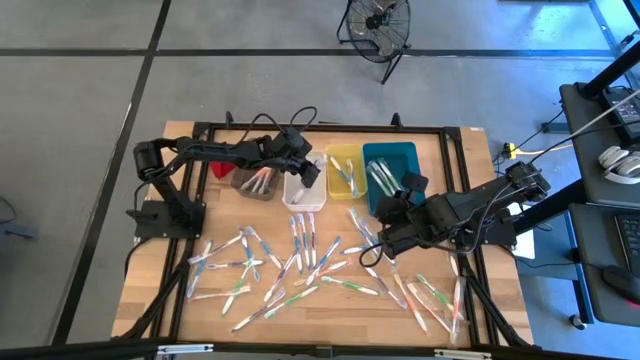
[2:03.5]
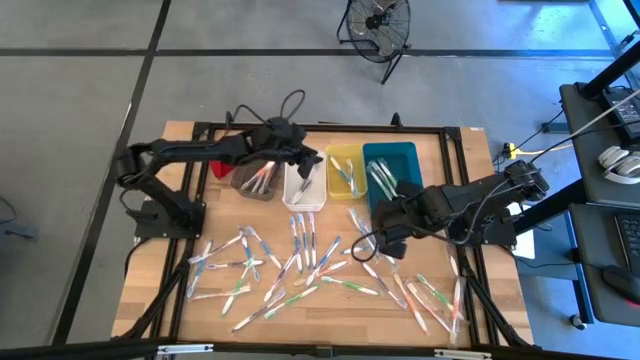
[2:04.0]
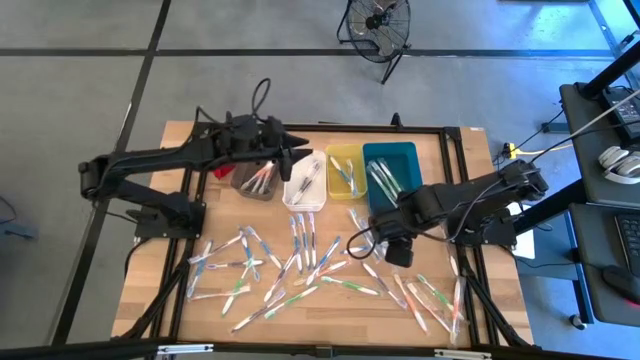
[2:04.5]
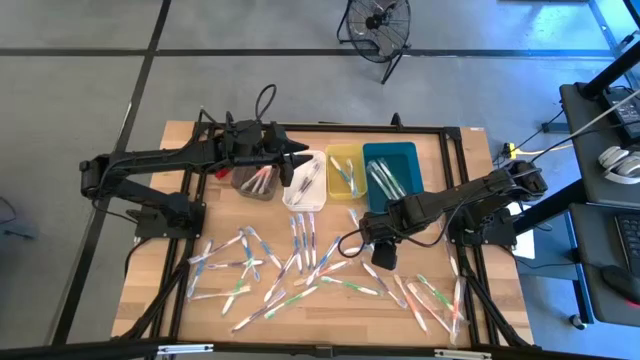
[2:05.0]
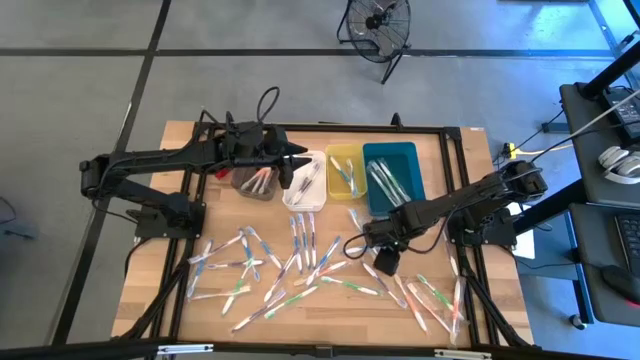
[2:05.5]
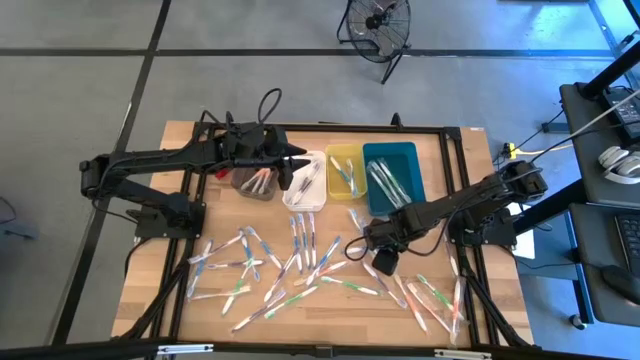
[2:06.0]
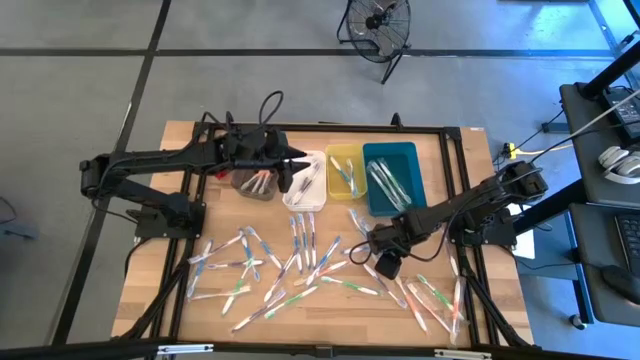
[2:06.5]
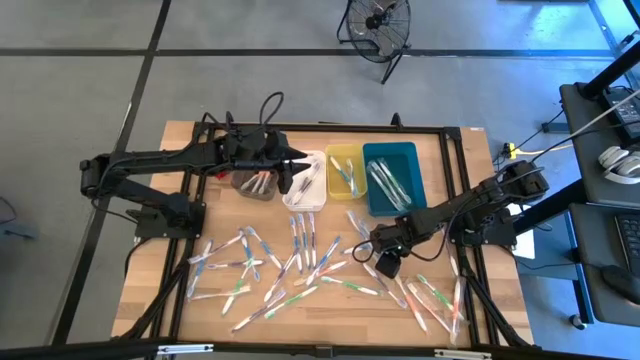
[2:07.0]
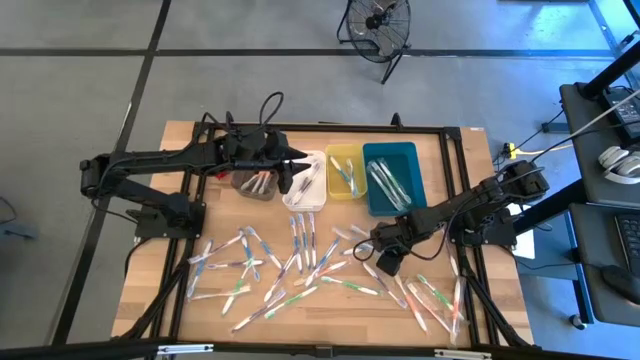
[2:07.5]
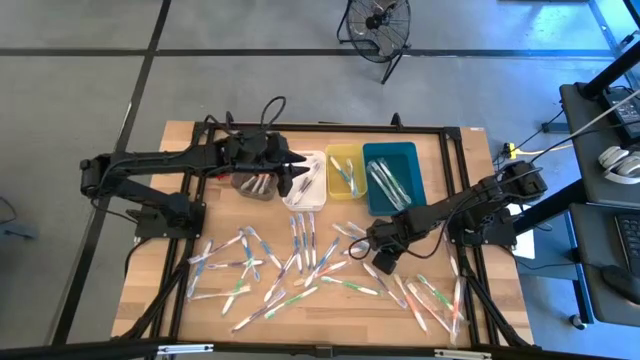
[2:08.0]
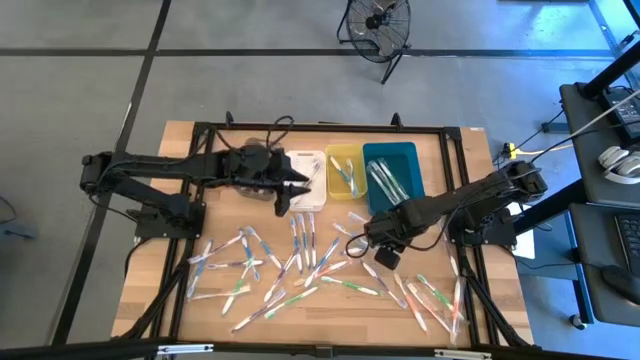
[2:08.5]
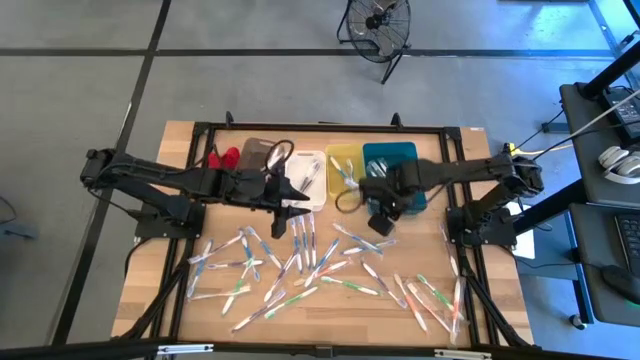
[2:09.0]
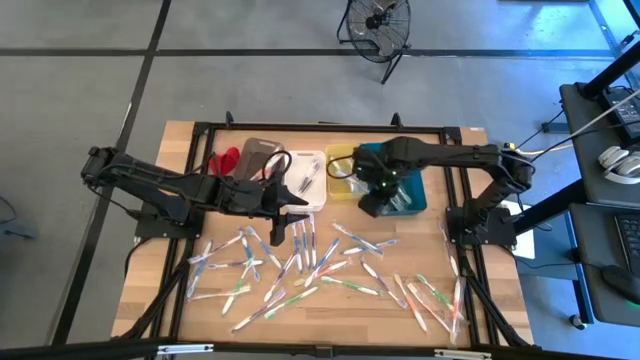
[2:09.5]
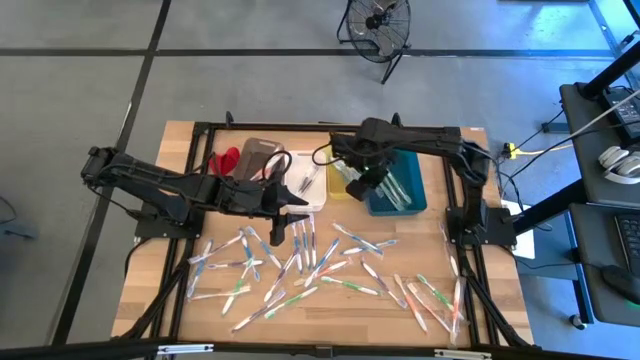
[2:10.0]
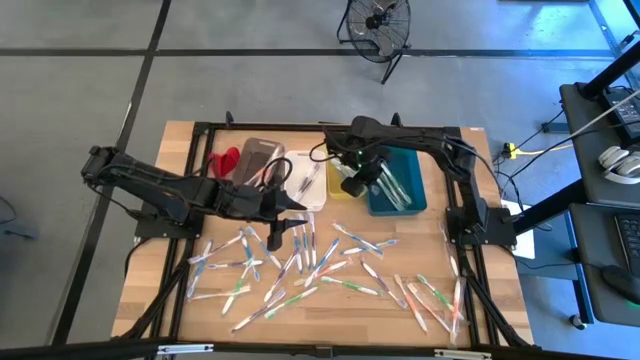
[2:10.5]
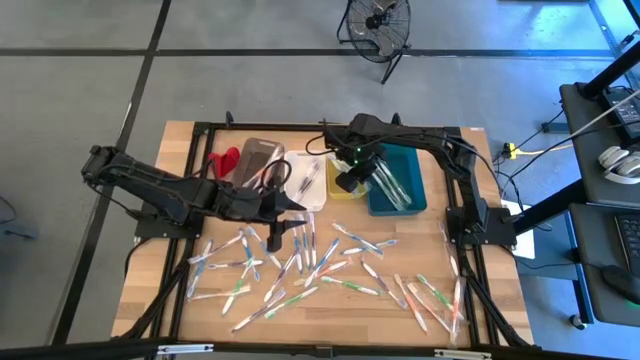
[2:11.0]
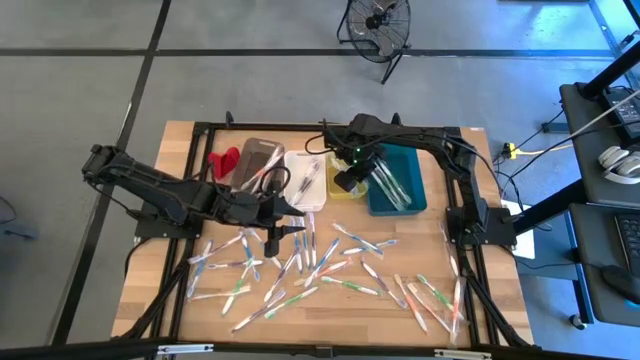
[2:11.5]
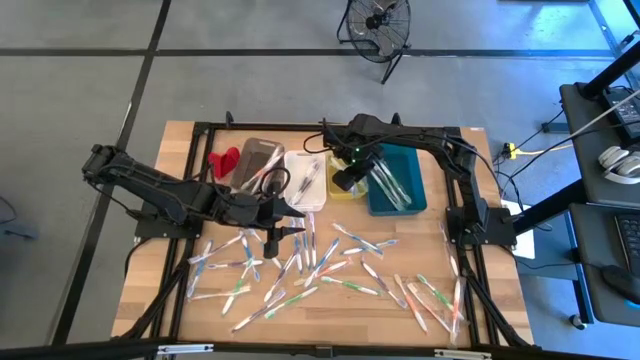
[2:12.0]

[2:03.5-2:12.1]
Task: Pick & Place Toothbrushes
Put the blue toothbrush into the yellow bin

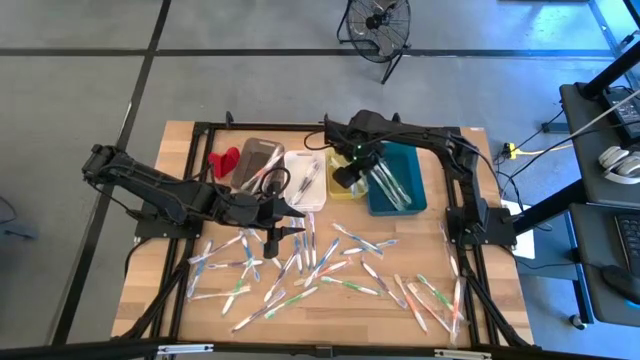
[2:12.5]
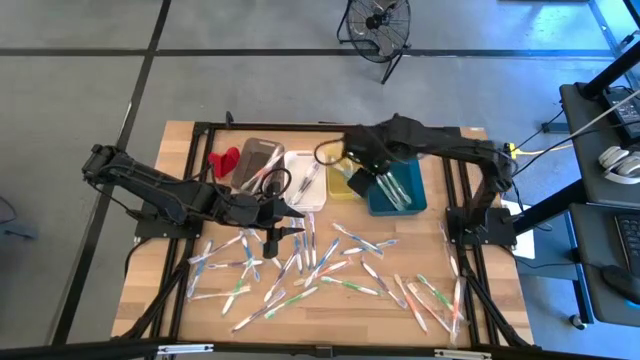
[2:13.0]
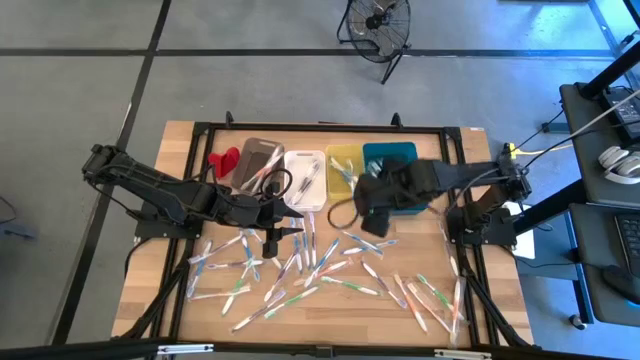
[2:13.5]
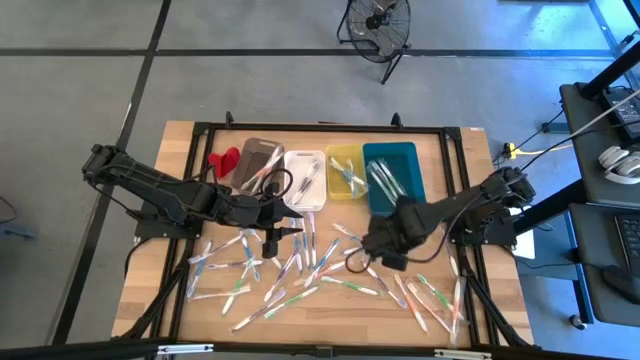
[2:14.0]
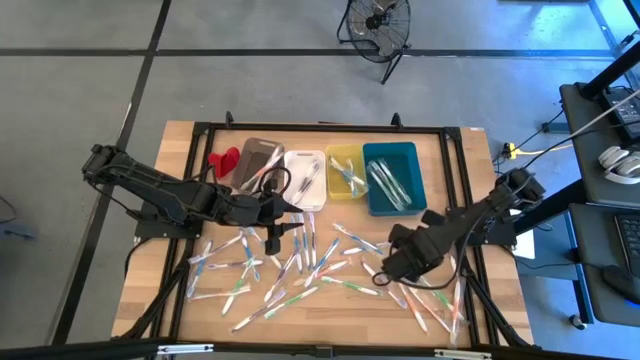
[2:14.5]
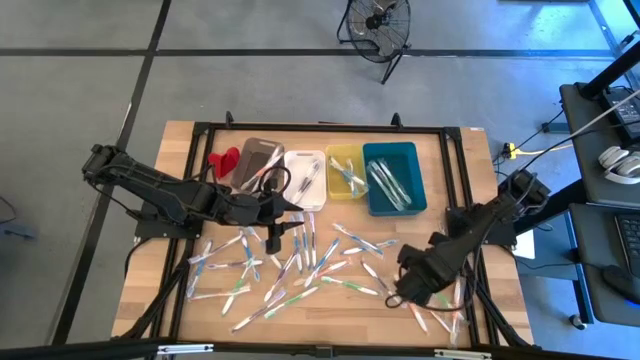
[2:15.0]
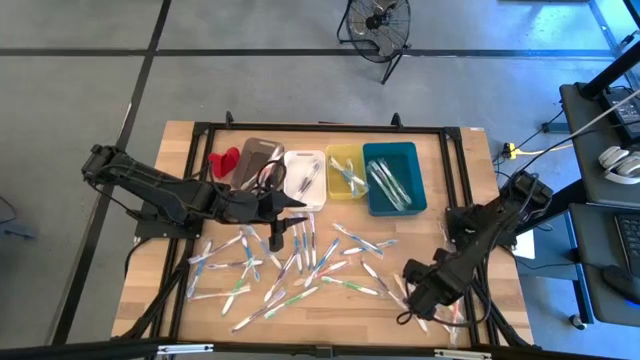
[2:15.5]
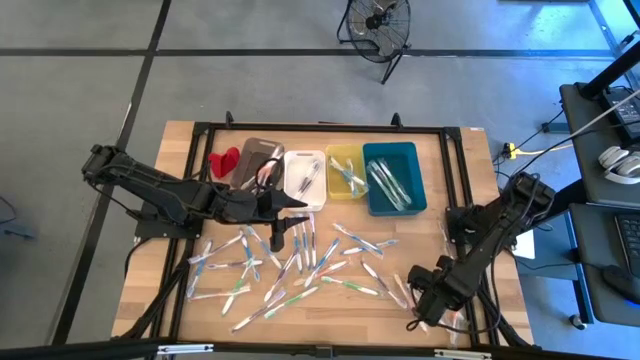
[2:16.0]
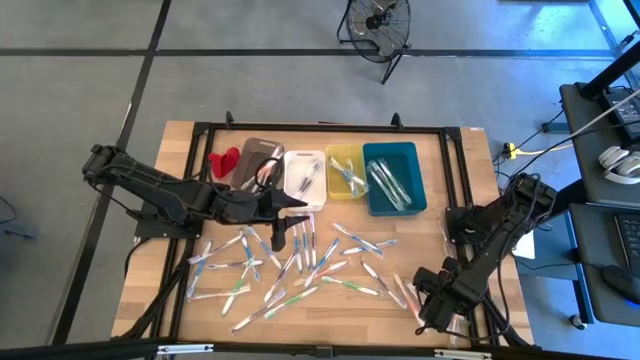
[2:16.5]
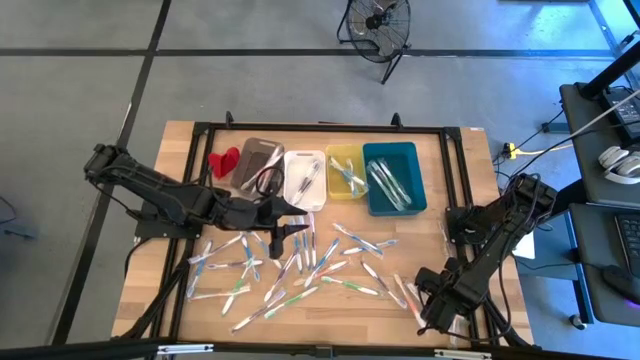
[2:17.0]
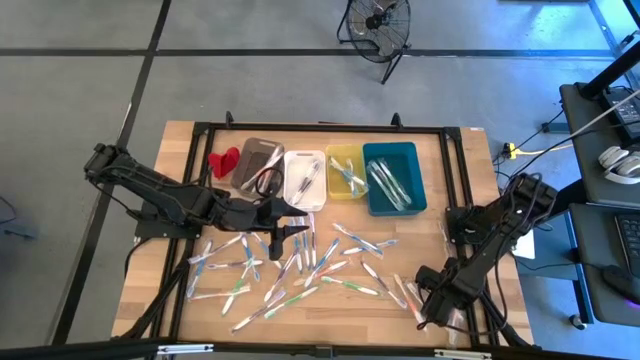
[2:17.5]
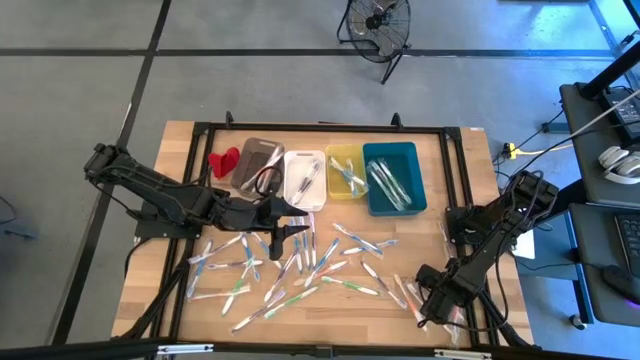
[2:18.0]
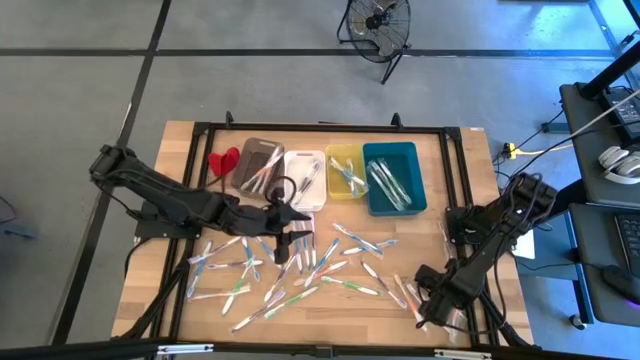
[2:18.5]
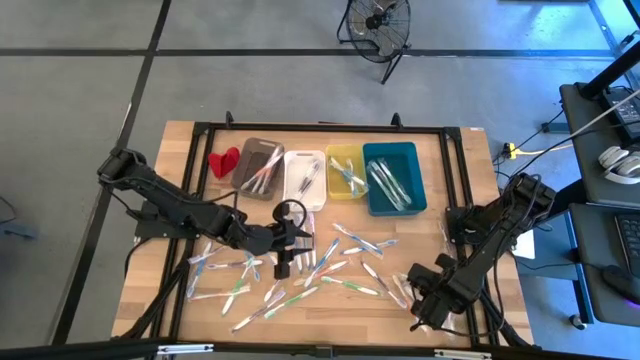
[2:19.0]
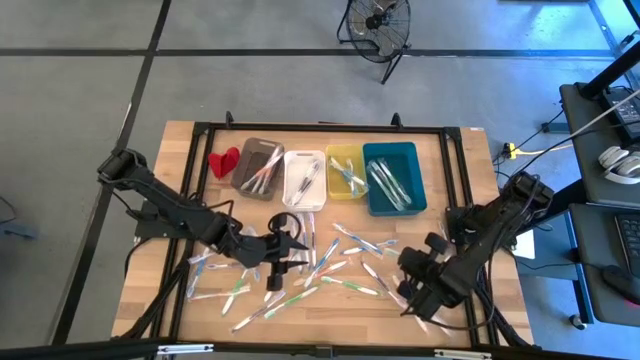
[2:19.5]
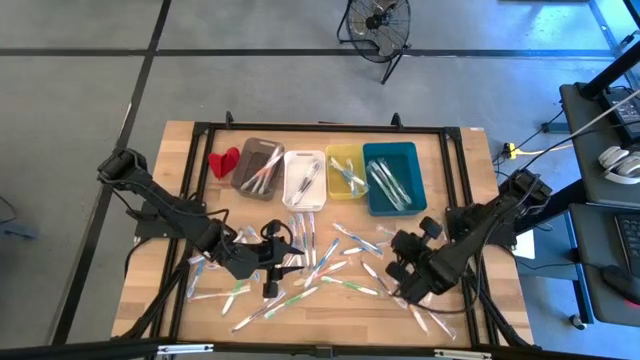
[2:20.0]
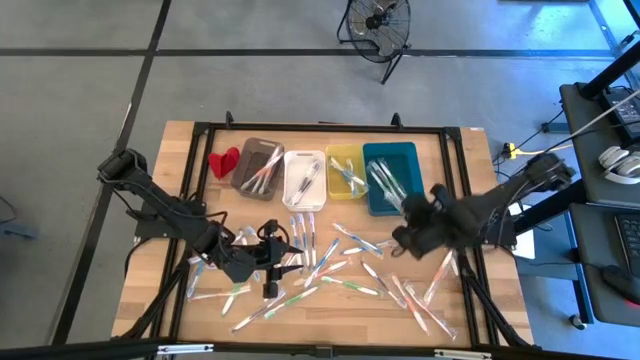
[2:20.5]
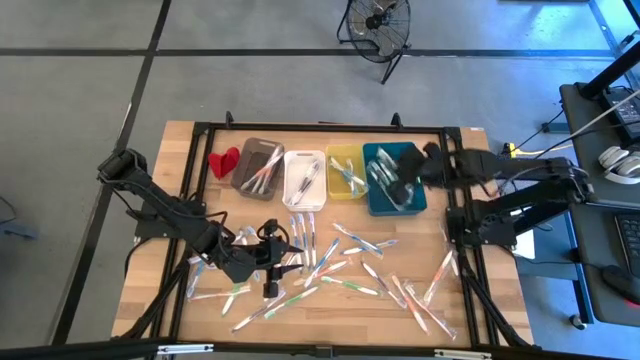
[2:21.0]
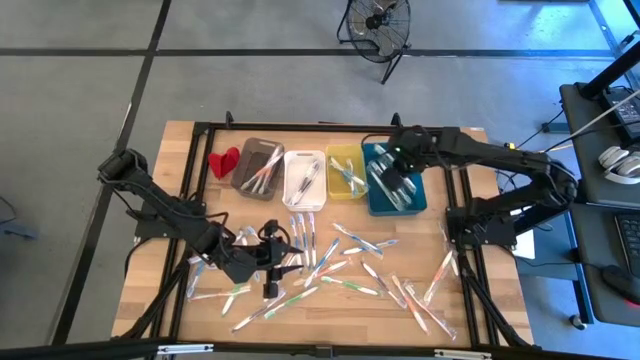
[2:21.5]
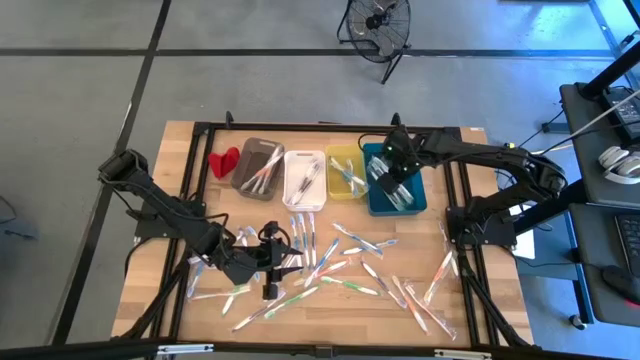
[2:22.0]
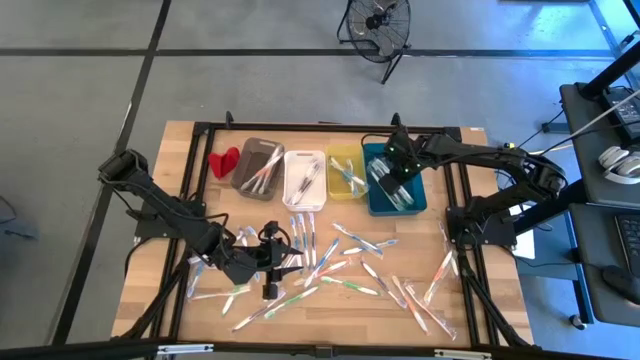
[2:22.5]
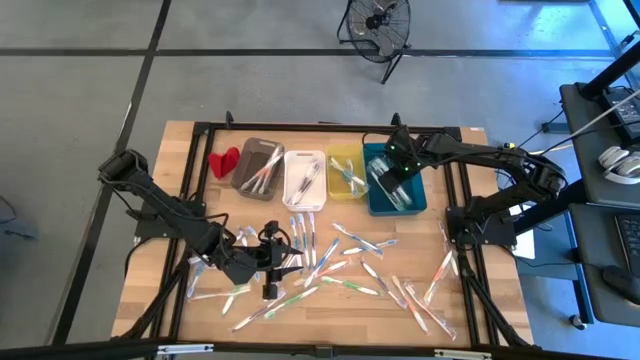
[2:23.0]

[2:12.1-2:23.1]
Put the green toothbrush into the blue bin
